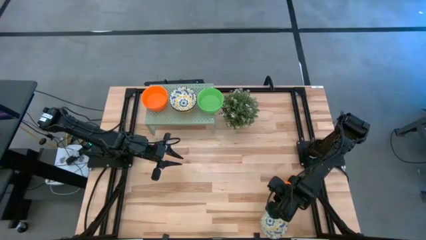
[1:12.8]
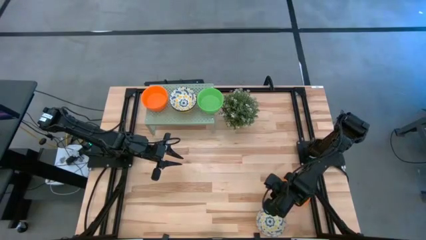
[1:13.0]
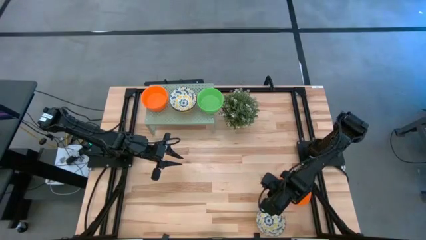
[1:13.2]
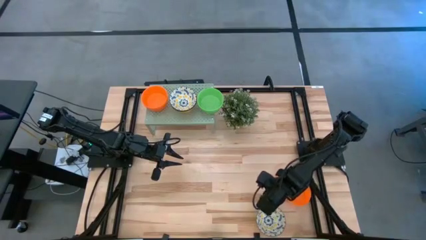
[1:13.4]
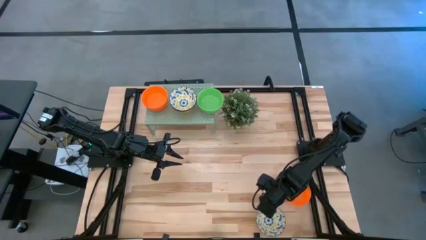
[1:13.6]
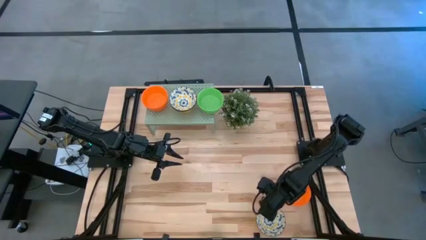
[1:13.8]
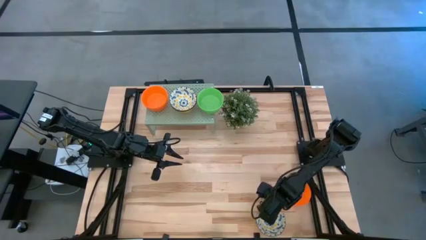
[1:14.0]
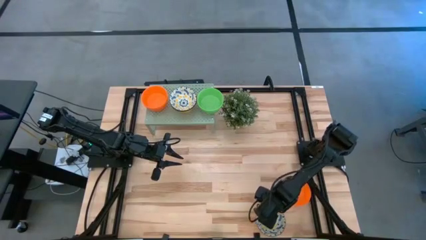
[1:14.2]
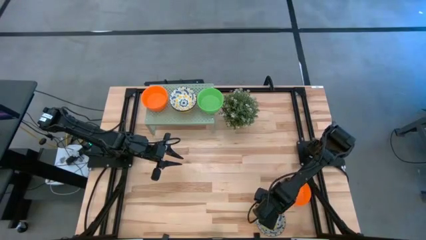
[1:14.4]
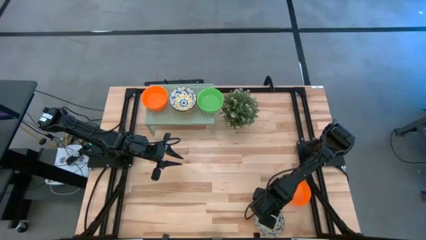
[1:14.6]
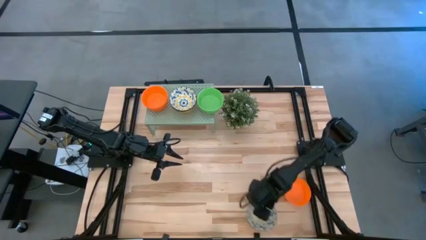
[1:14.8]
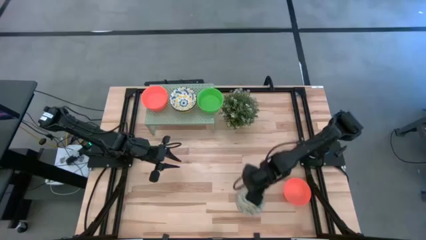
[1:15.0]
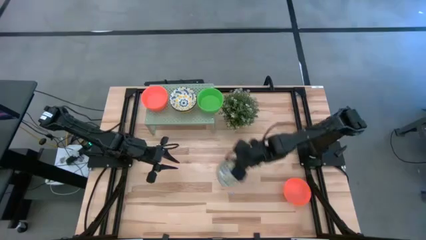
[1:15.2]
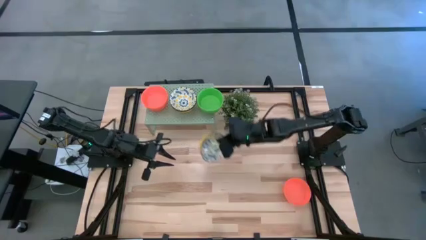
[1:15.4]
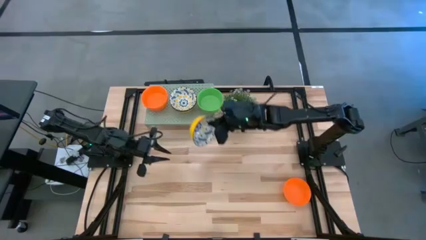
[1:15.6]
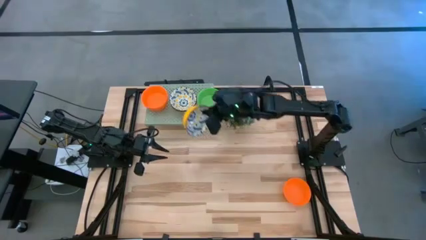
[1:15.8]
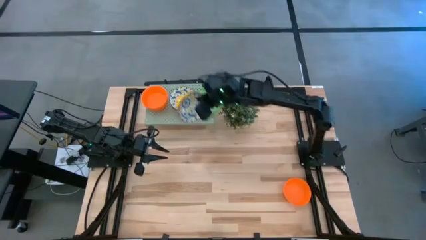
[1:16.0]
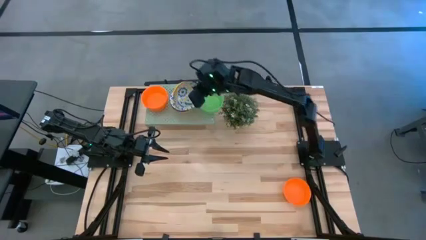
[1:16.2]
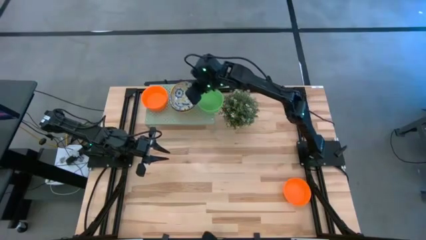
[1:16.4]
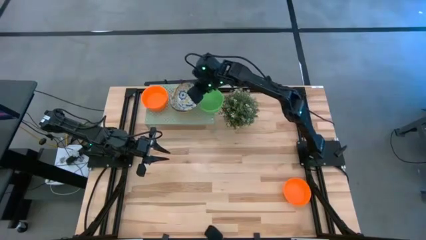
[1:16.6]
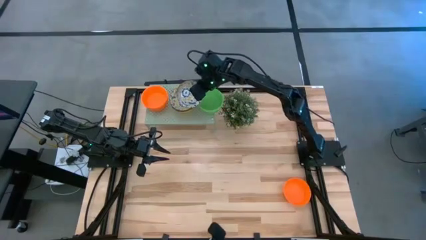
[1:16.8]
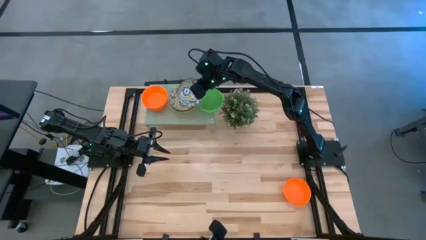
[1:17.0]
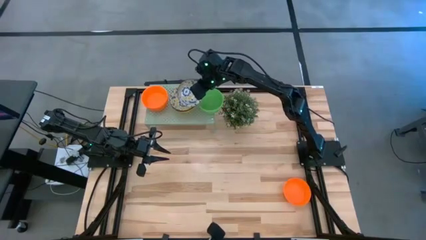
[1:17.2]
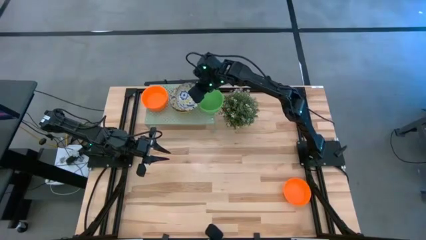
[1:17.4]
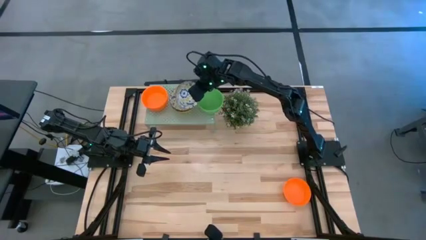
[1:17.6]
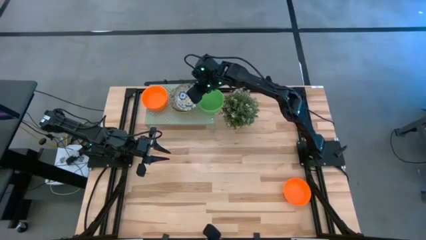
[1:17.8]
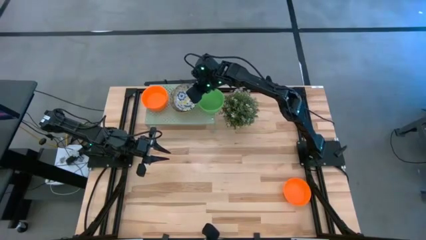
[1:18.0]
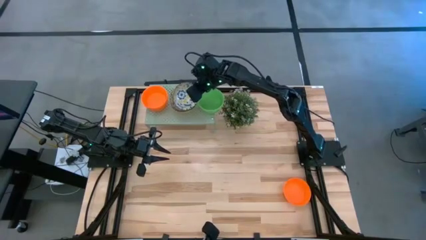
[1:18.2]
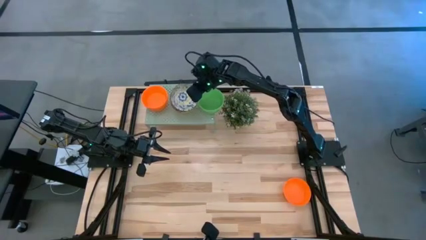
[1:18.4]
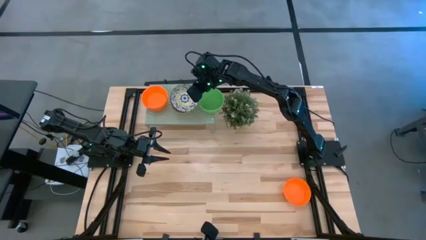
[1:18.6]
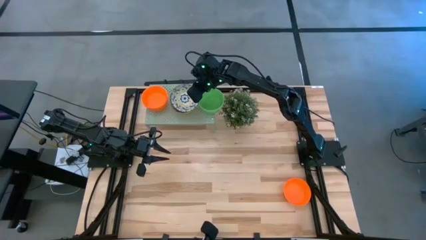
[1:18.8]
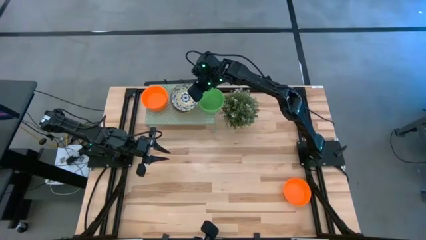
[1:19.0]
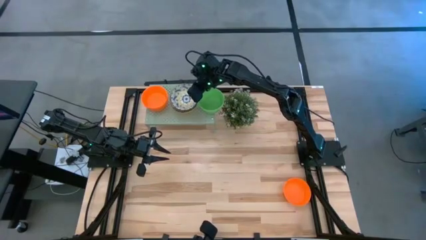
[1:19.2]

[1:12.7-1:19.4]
Task: Pick & Place Mini bowls
Stack the white pattern bowl on top of the stacked white pattern bowl on the shelf

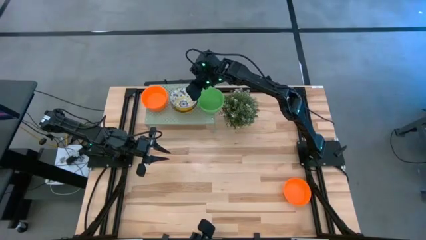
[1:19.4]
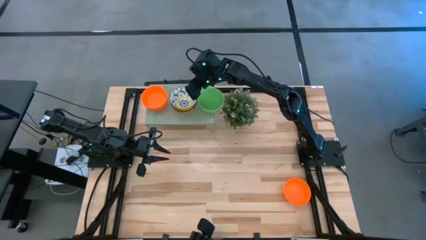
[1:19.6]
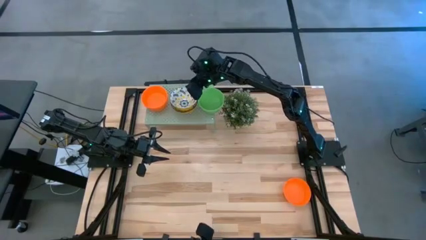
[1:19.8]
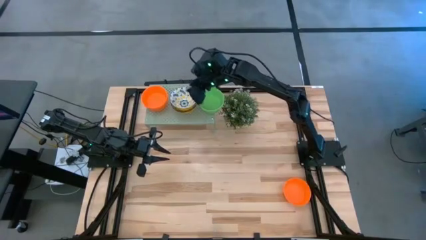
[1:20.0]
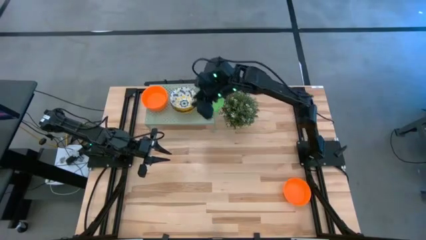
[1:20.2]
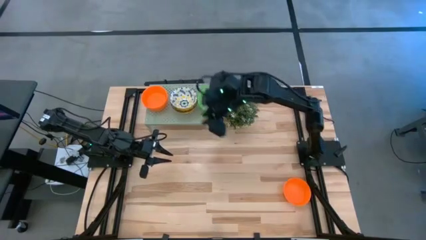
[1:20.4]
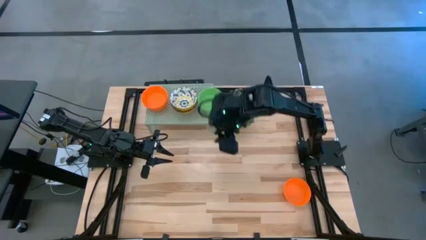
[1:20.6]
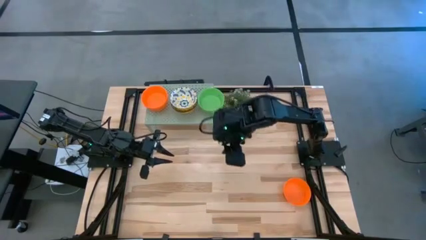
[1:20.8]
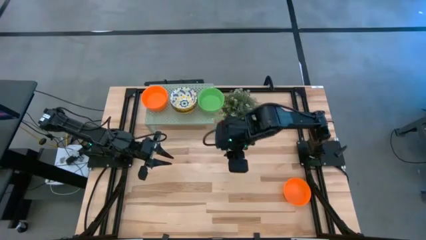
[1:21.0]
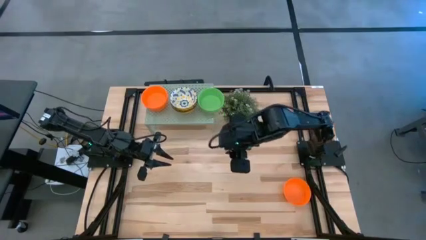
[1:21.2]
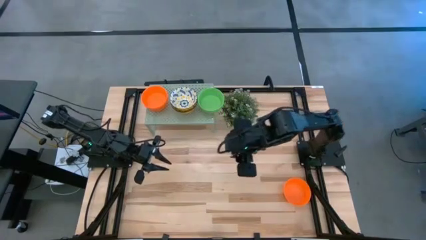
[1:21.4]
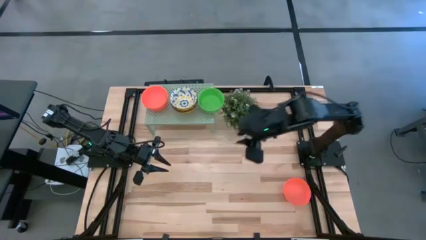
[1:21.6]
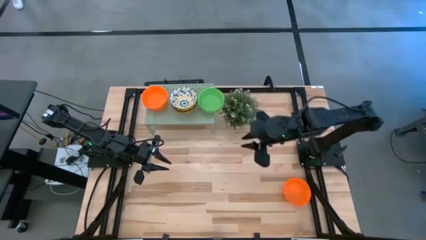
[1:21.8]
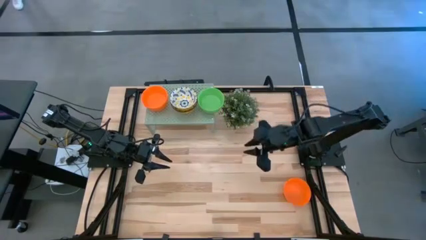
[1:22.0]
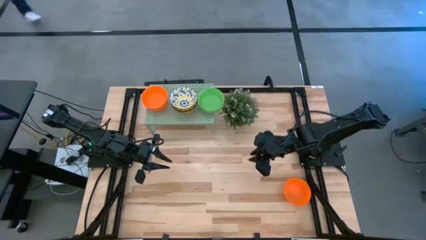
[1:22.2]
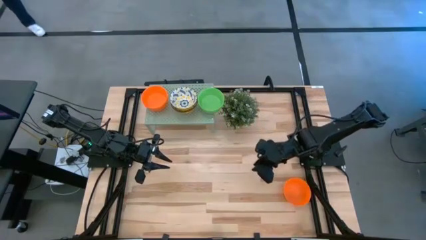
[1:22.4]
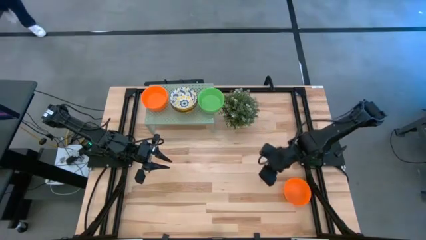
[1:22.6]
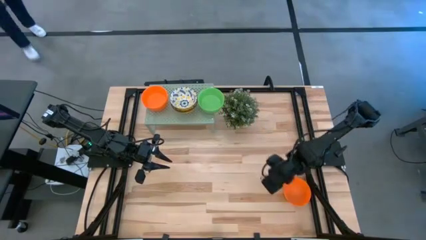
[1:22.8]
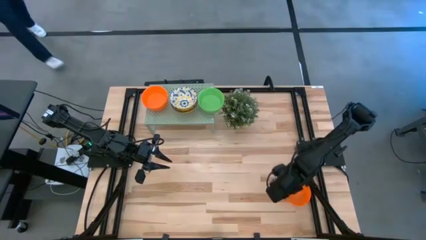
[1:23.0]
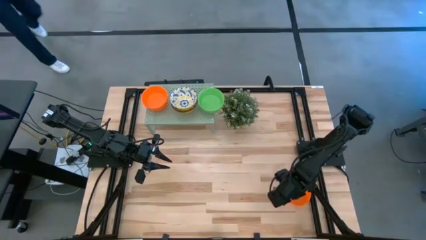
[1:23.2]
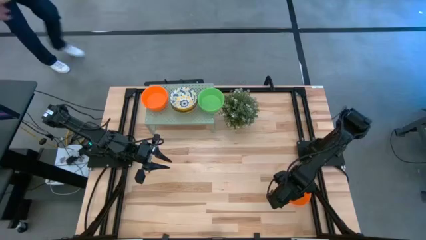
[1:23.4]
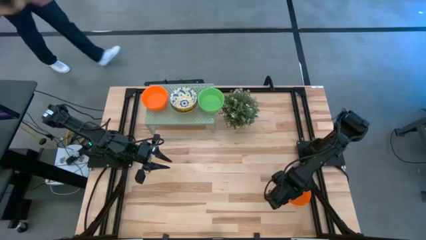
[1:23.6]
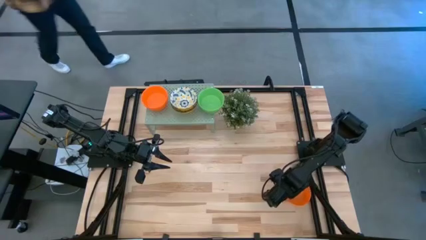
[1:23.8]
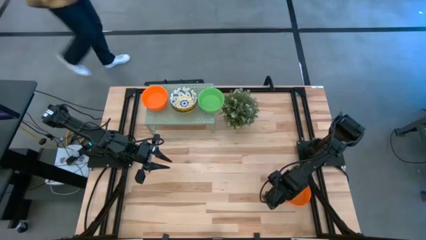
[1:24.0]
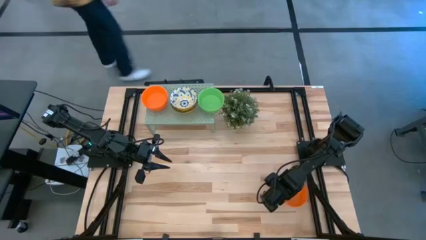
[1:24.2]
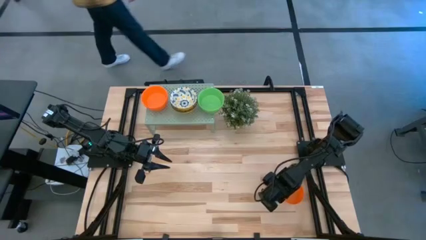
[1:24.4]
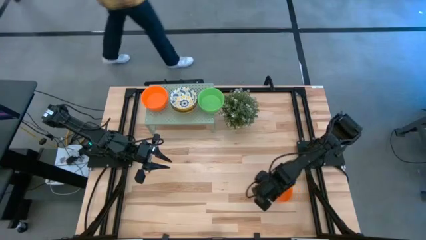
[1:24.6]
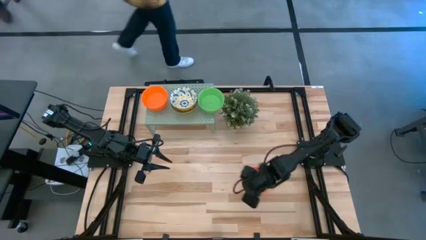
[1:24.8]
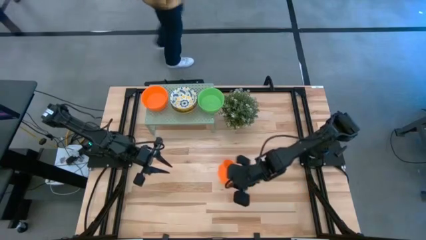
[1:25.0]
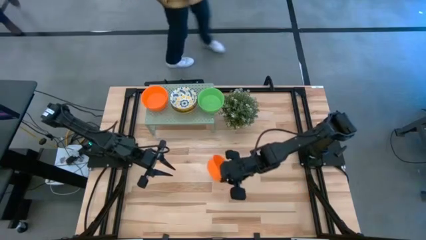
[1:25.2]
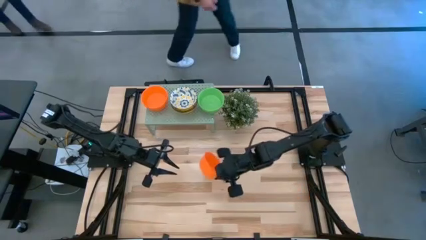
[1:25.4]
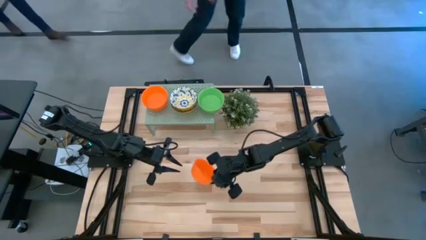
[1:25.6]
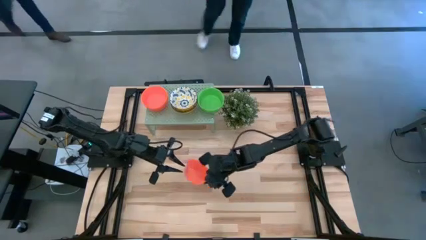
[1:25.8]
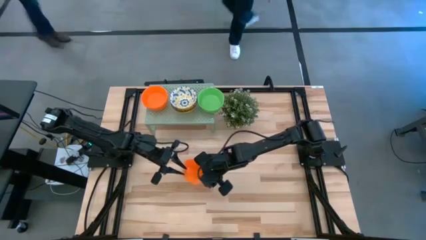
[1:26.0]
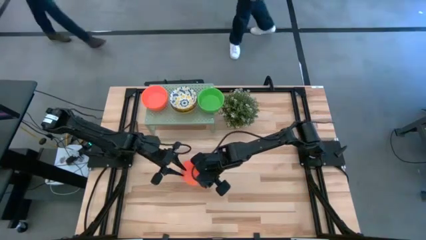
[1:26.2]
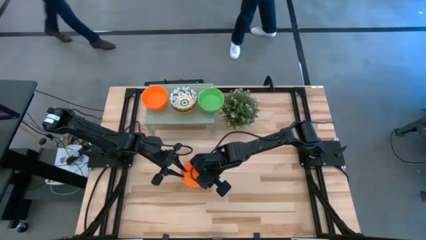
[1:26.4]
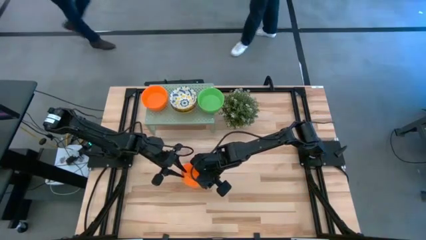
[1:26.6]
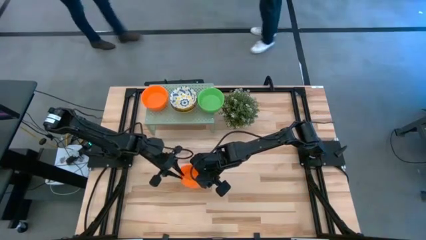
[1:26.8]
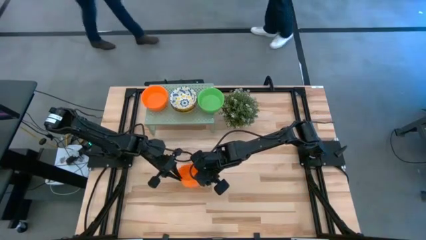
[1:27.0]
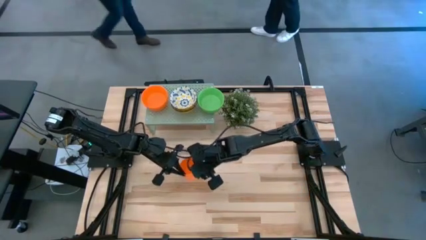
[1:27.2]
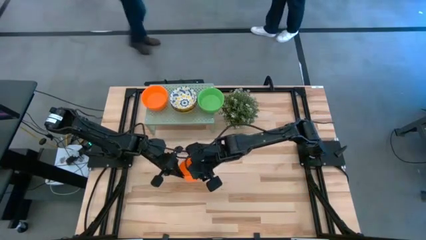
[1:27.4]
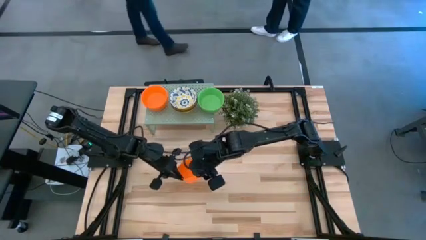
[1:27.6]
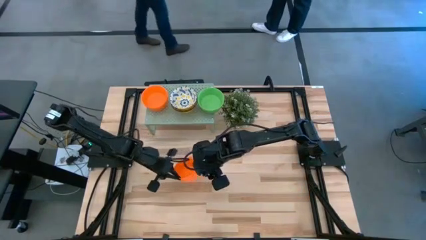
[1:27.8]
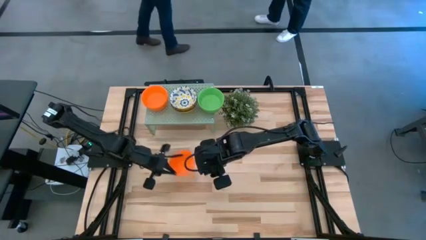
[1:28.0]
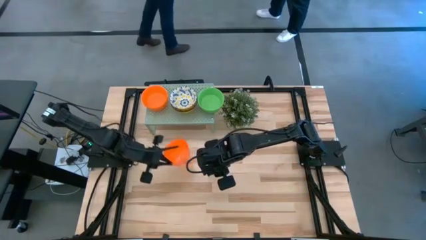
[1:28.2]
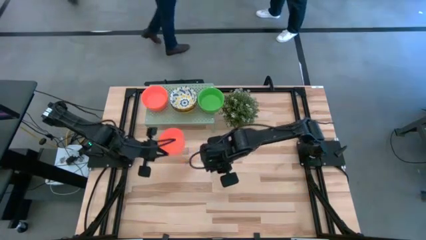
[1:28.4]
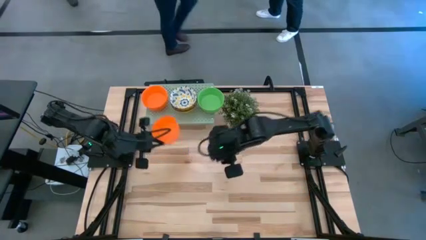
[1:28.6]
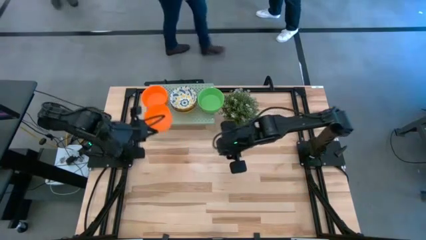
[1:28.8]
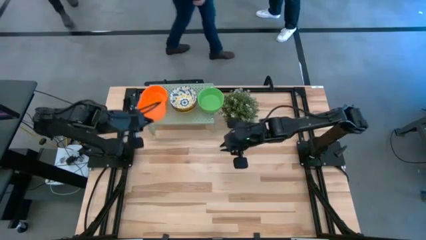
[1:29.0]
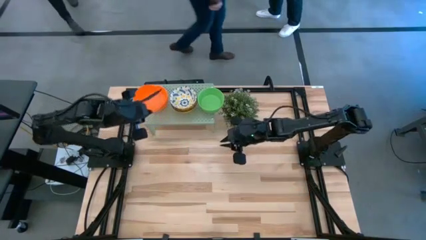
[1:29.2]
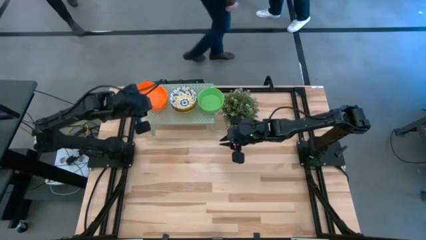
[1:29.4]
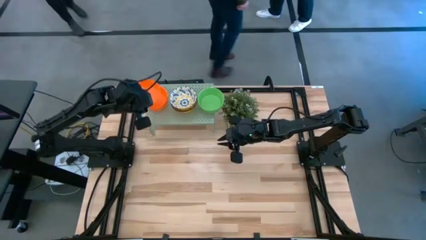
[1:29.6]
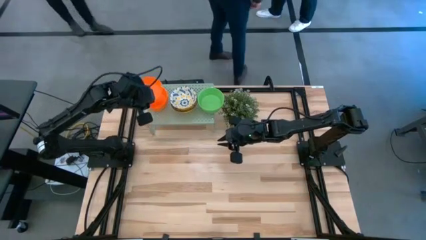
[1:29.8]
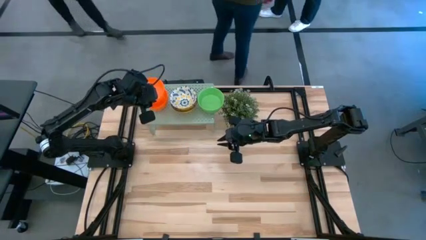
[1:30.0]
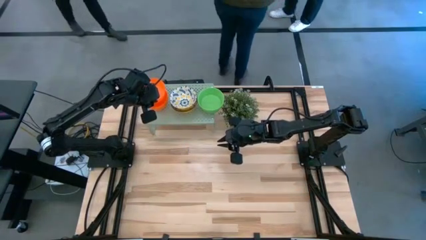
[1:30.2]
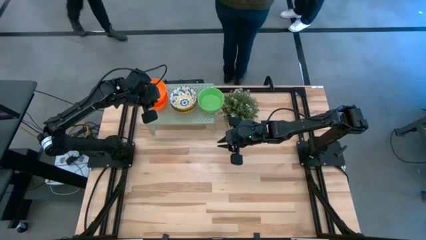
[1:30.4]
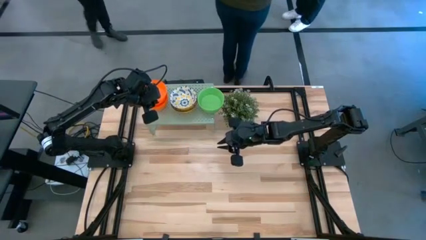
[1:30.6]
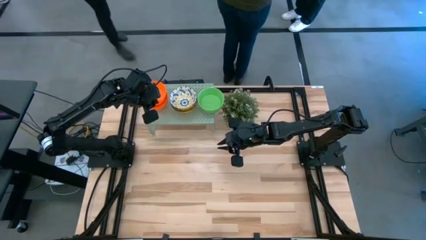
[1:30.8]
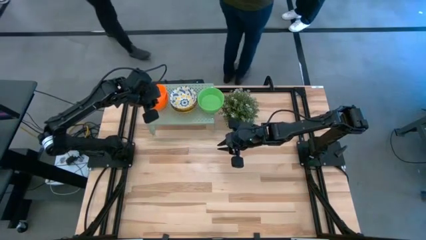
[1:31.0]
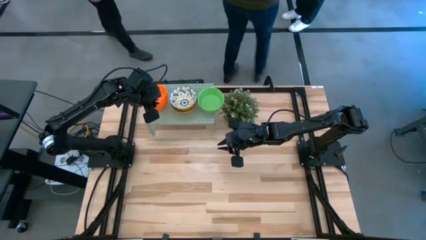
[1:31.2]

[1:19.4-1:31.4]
Stack the orange bowl on top of the stacked orange bowl on the shelf
